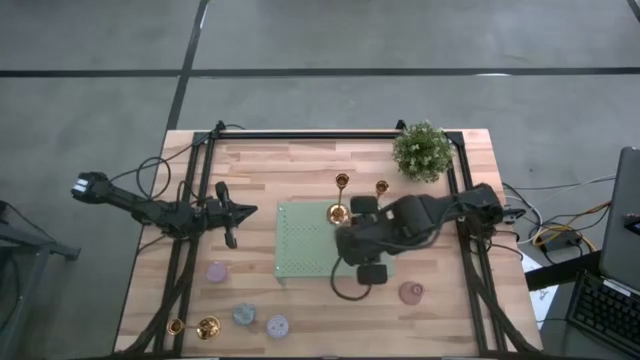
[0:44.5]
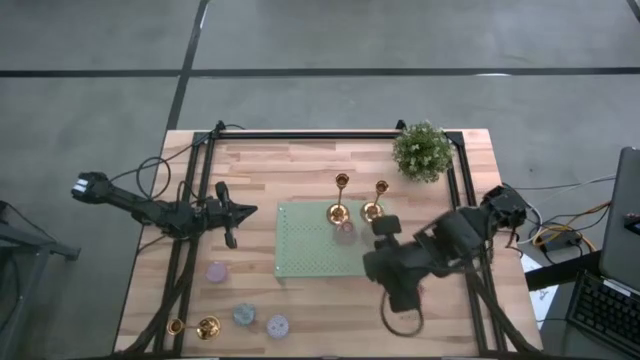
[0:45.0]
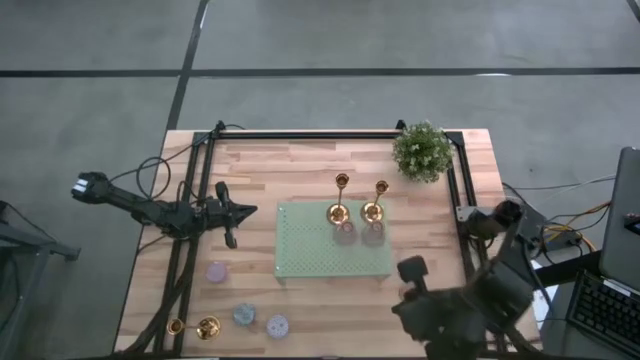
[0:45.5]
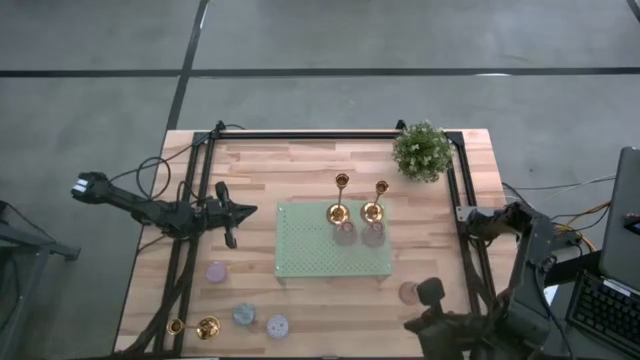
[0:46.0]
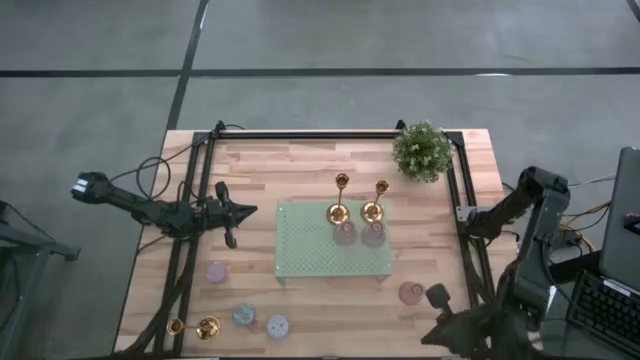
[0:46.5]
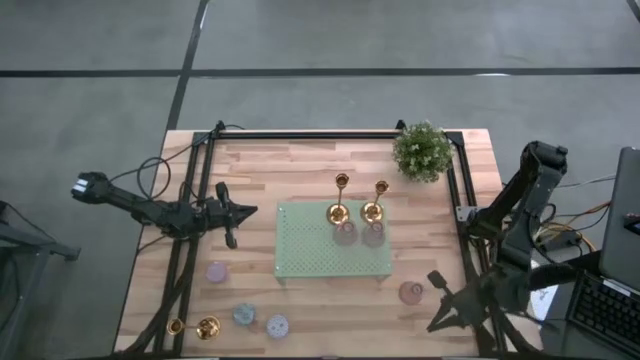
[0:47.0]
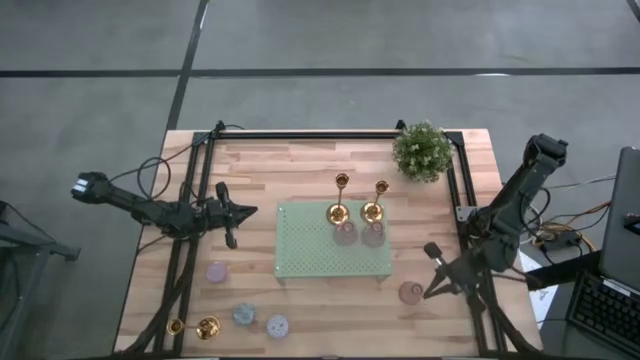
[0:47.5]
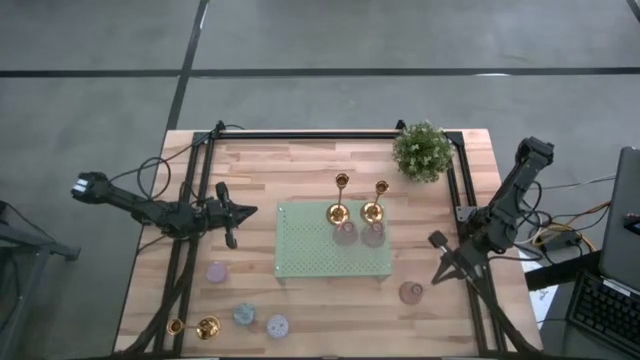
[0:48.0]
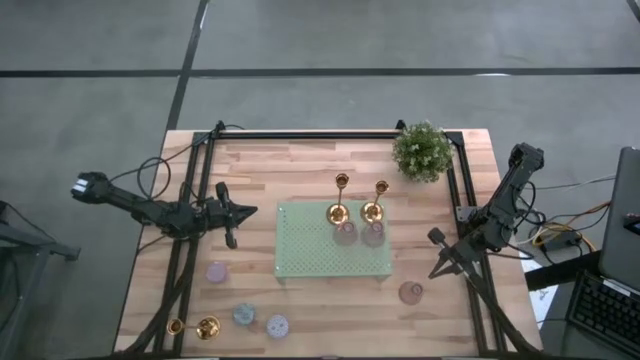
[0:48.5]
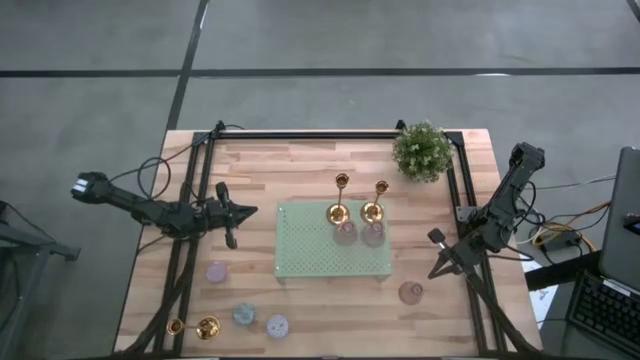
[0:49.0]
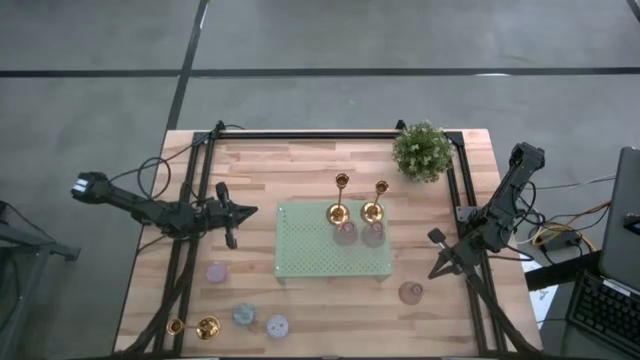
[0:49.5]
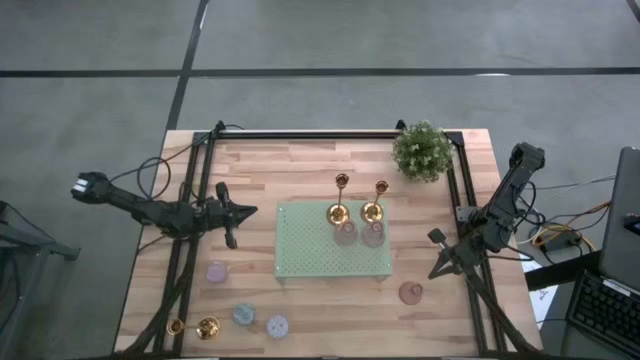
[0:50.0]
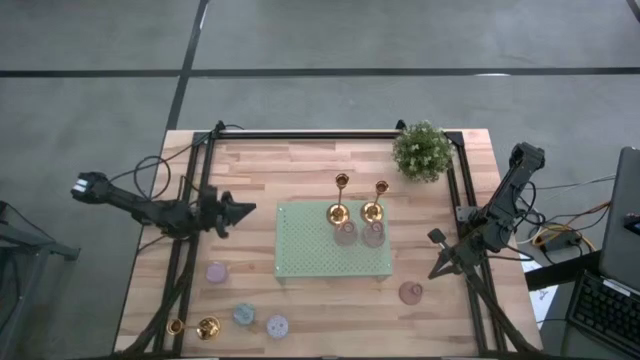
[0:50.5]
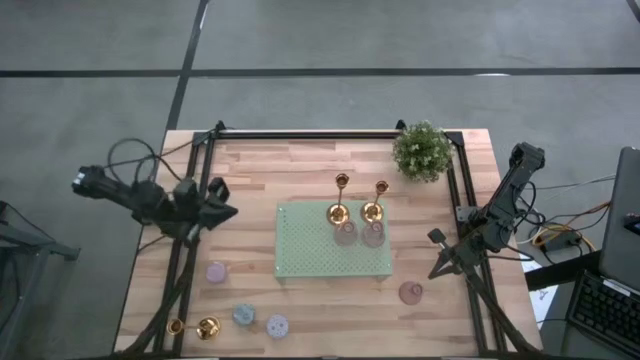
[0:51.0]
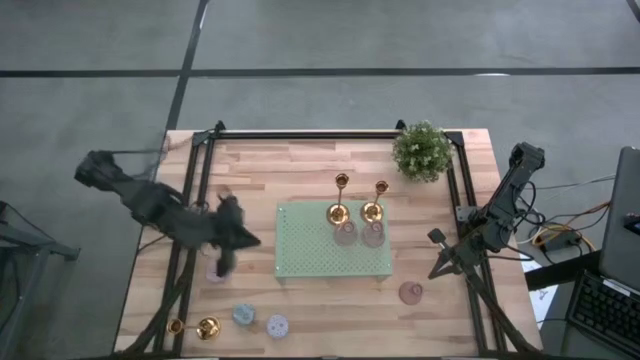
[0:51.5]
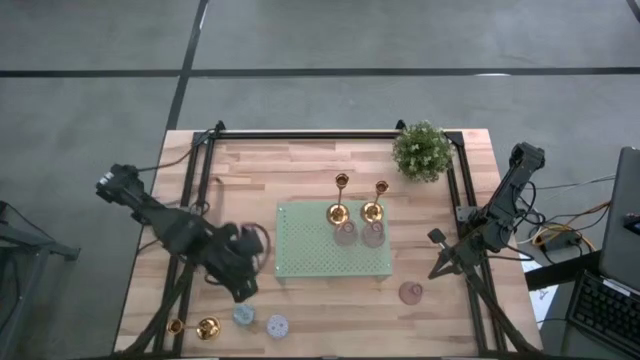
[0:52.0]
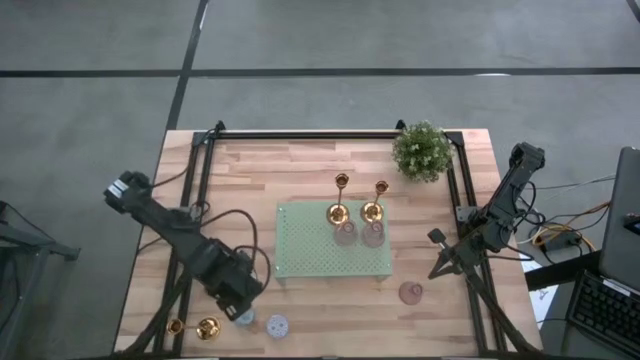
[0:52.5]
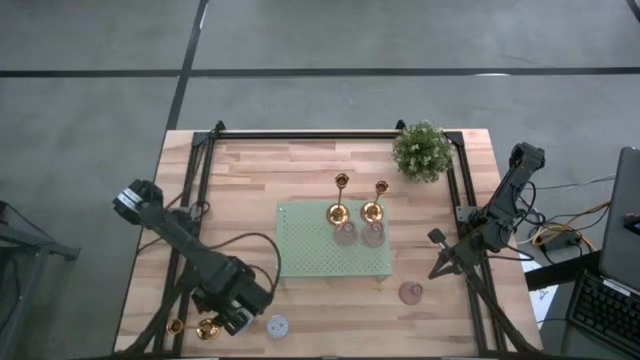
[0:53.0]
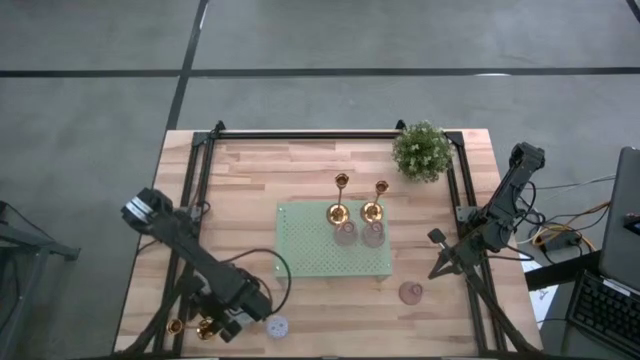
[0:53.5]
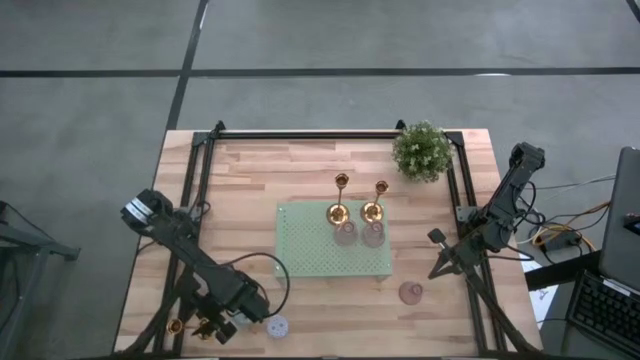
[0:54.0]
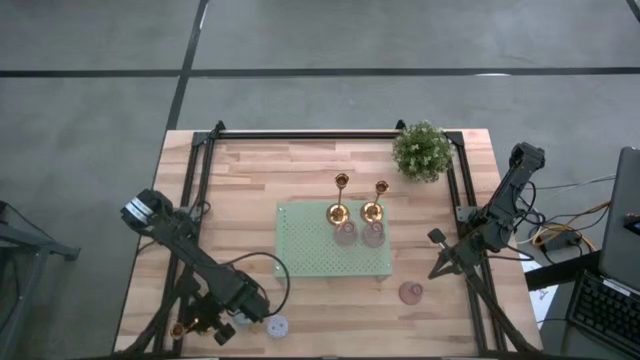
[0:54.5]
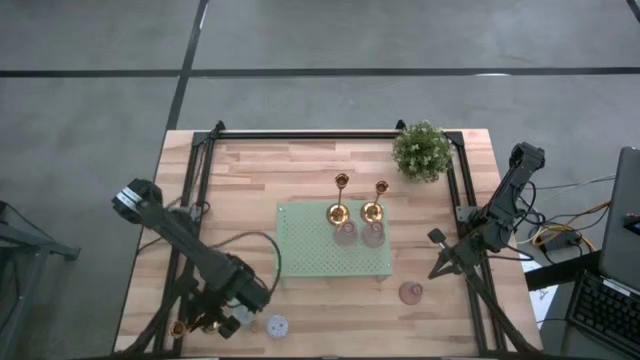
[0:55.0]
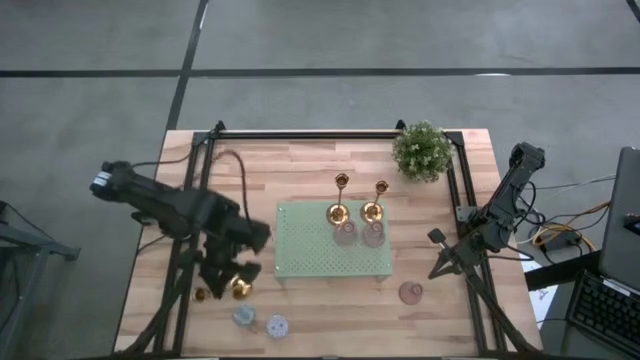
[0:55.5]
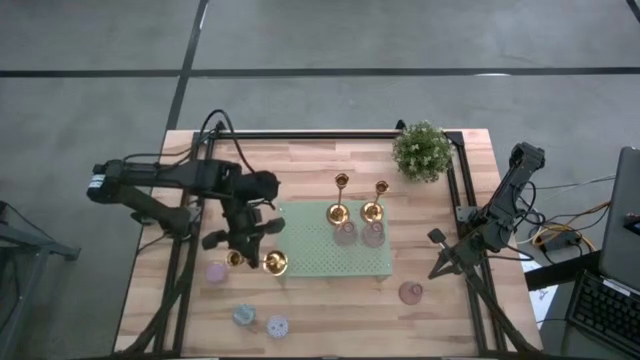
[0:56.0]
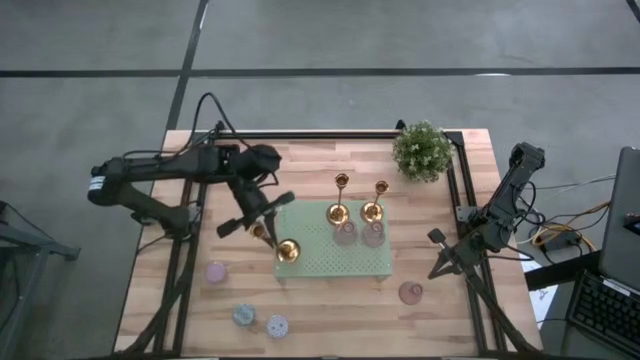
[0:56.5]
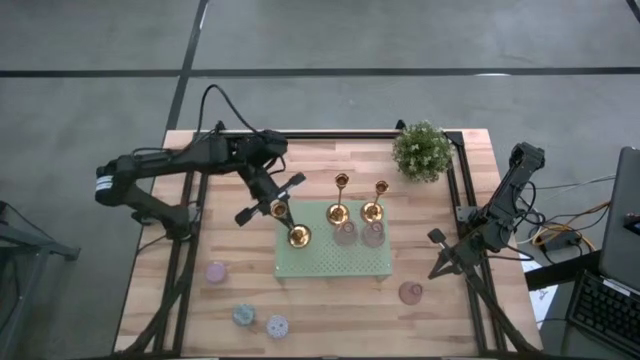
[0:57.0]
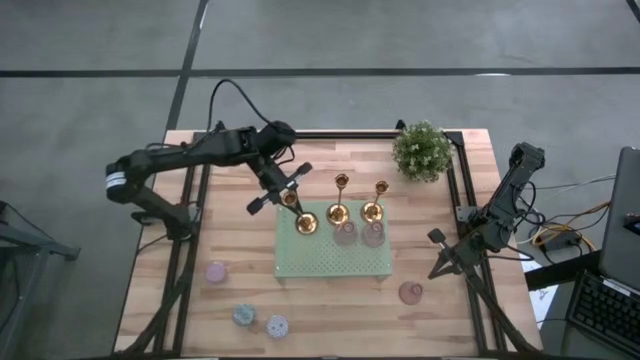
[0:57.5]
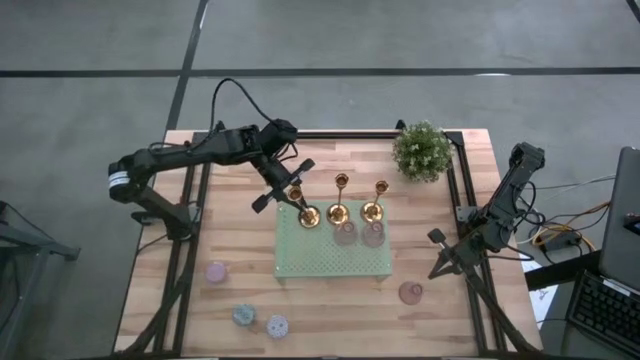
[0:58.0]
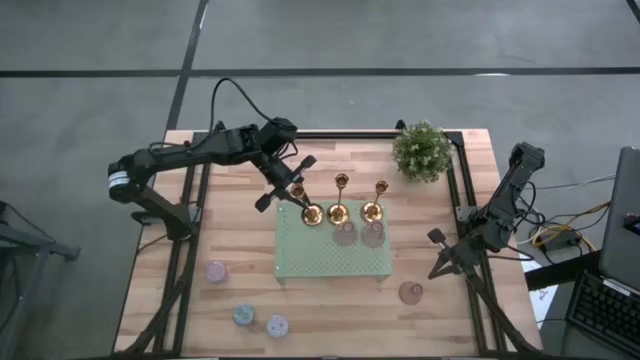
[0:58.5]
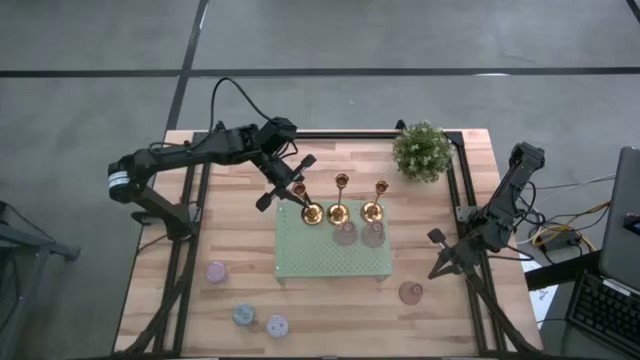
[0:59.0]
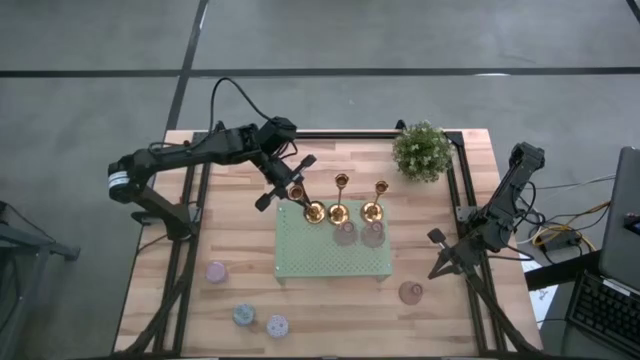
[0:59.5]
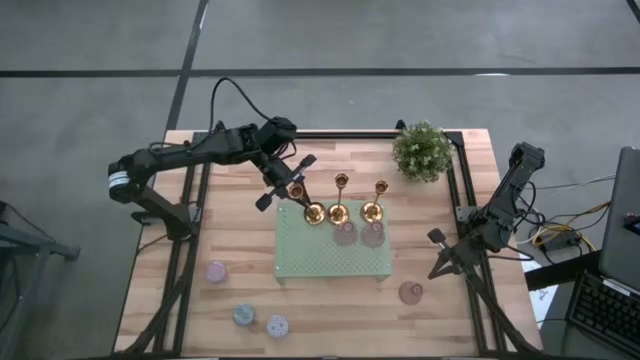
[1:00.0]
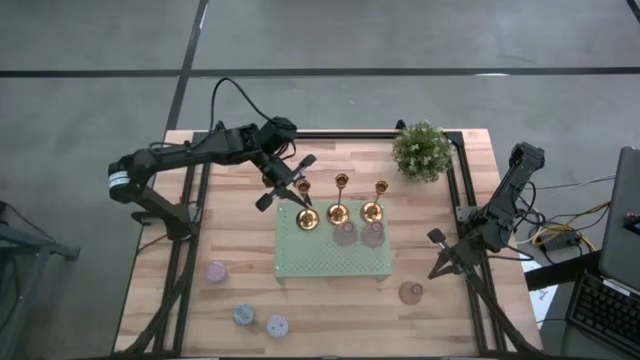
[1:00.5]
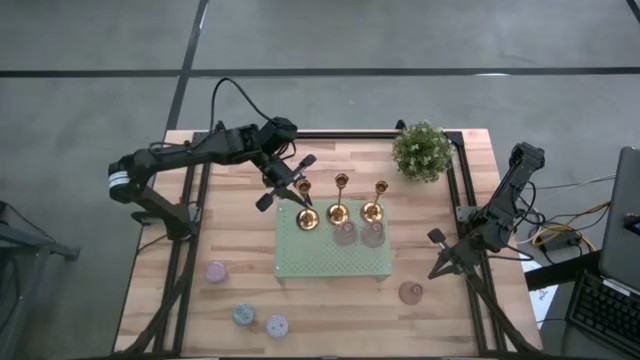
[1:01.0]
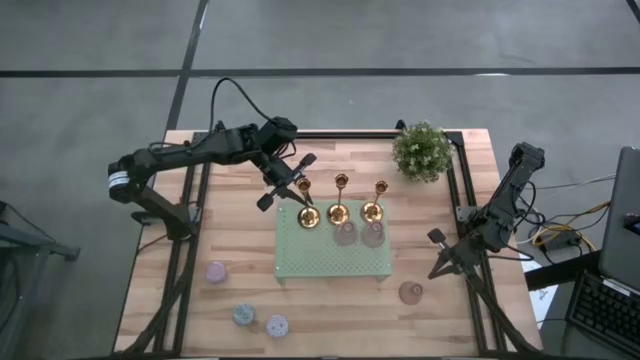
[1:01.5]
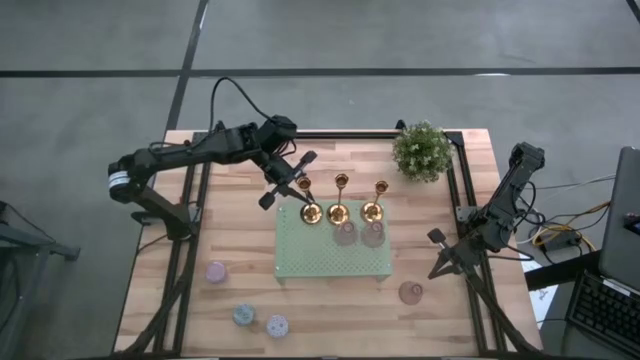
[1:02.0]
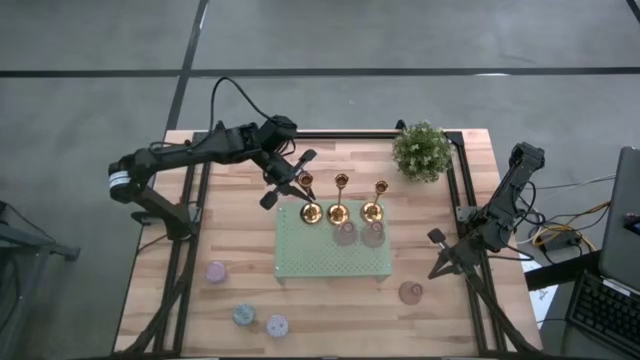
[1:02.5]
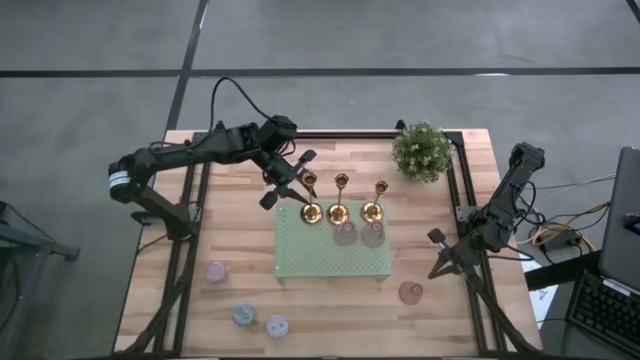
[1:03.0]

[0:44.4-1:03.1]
Task: Pick & Place candle stick holders
Put the gold candle holder on the shelf

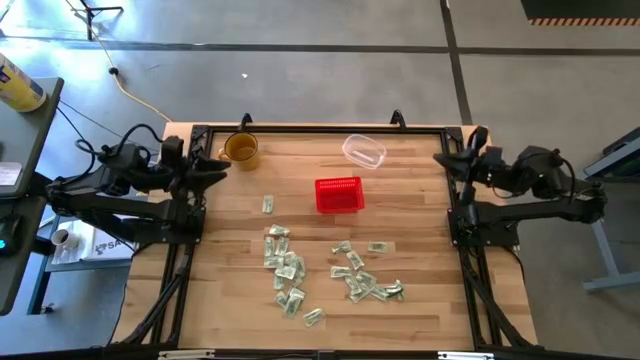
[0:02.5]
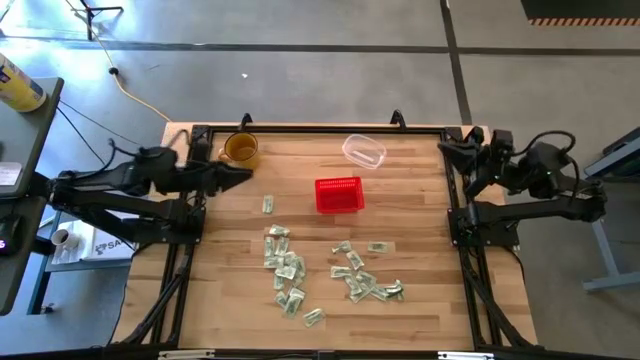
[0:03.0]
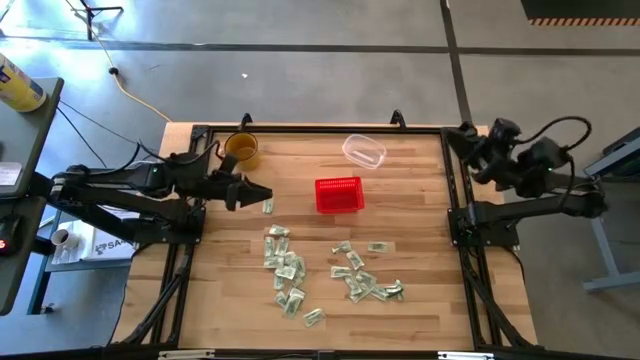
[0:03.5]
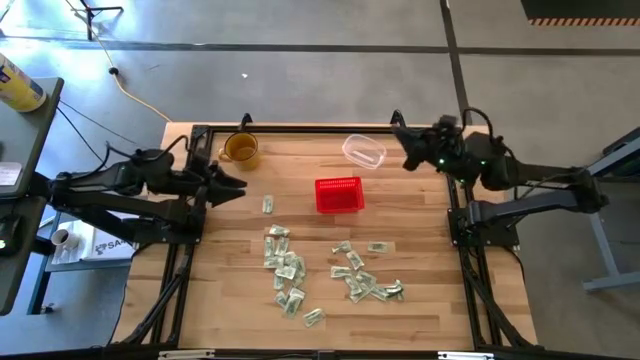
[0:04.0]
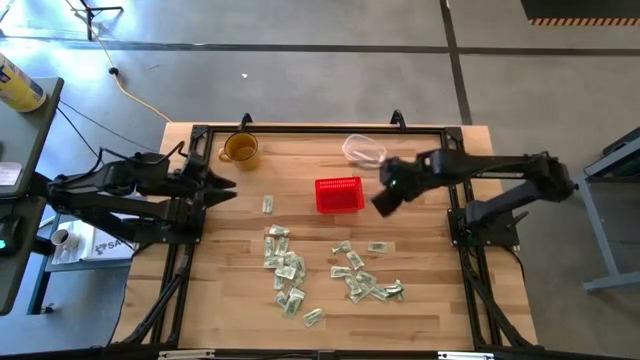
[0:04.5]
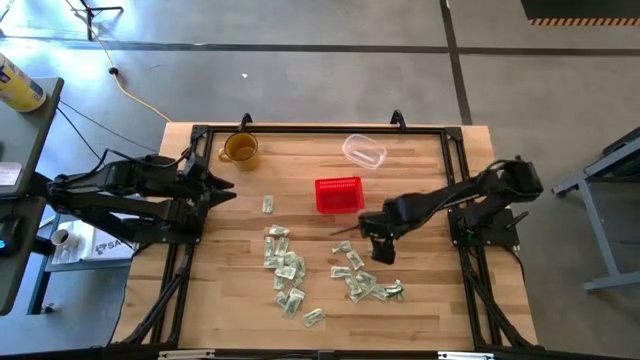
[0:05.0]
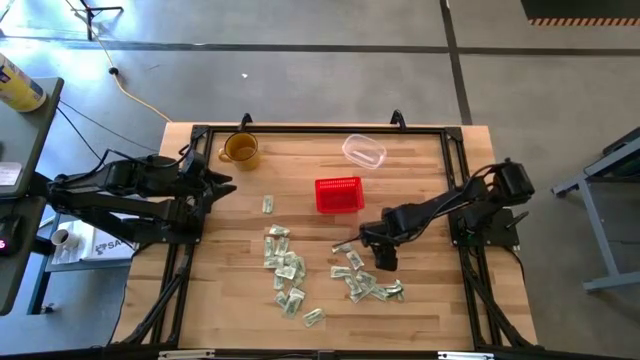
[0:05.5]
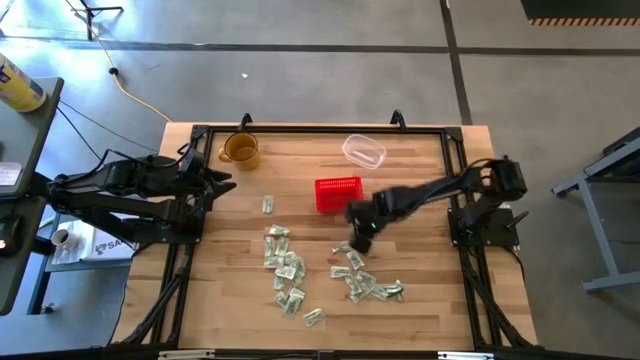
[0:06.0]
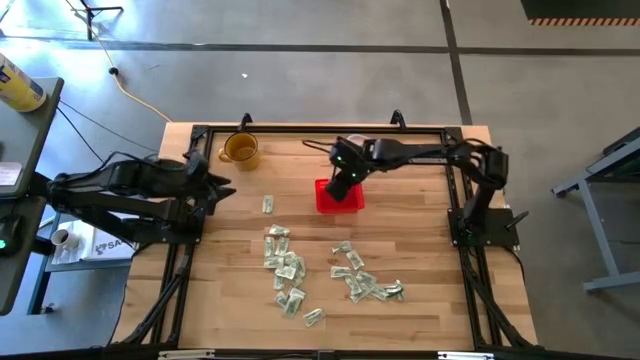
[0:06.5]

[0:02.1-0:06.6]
Task: Pick and place items into bin
Put the white packet into the red basket
